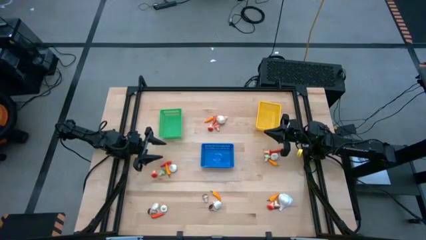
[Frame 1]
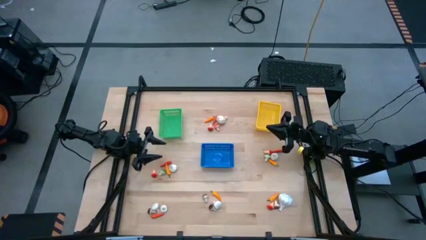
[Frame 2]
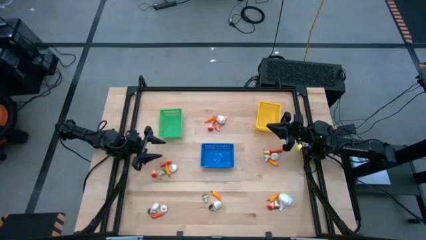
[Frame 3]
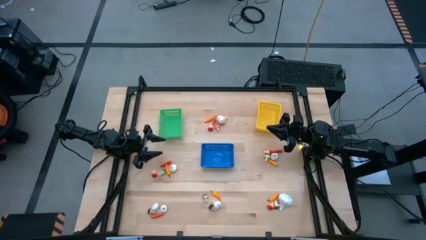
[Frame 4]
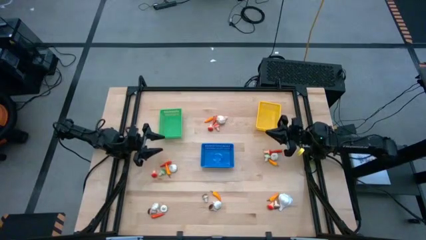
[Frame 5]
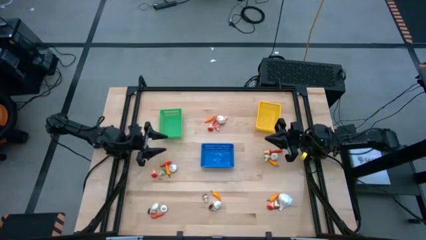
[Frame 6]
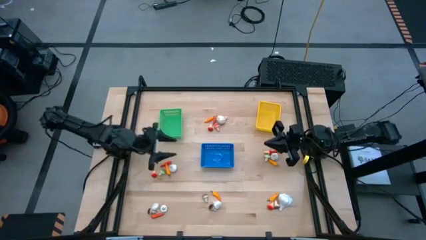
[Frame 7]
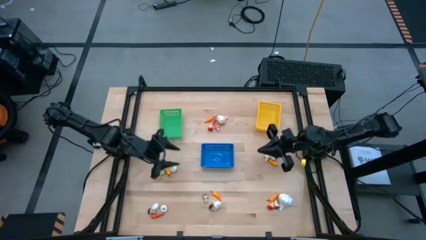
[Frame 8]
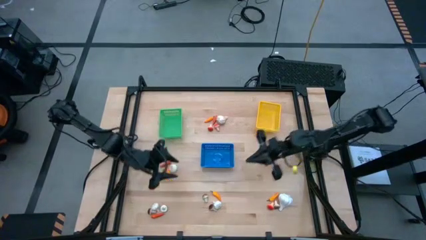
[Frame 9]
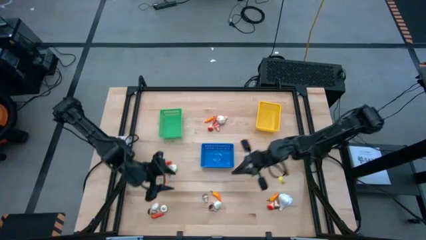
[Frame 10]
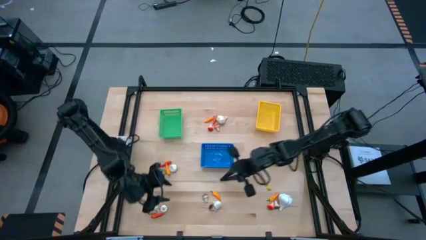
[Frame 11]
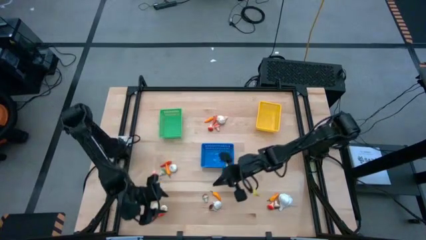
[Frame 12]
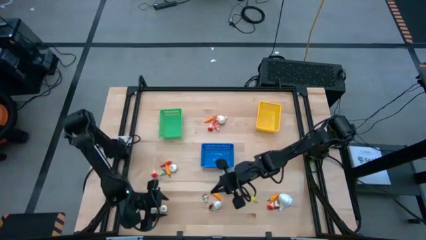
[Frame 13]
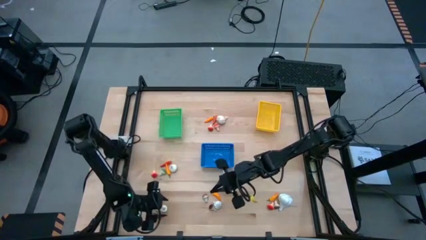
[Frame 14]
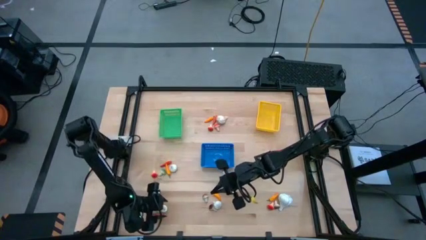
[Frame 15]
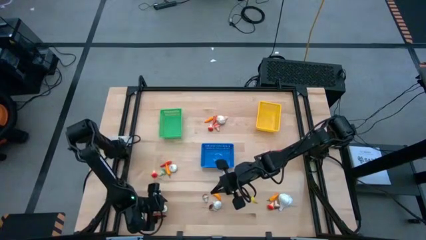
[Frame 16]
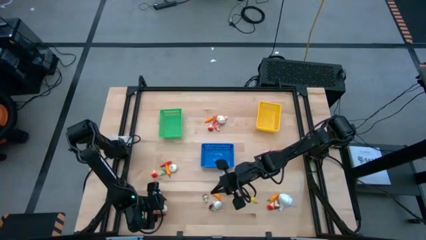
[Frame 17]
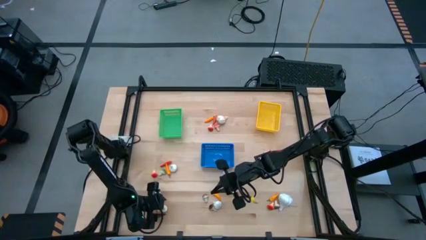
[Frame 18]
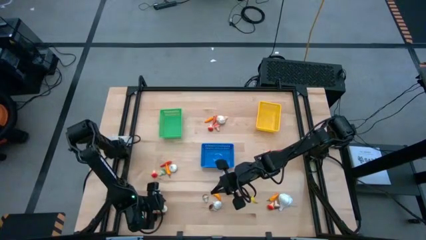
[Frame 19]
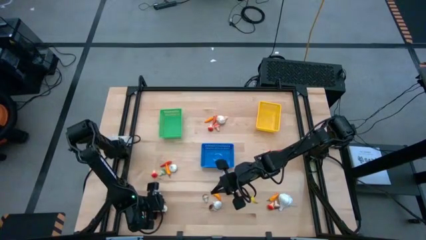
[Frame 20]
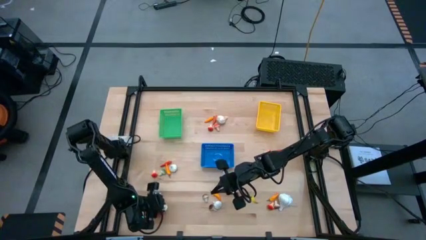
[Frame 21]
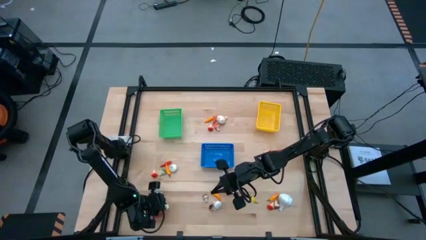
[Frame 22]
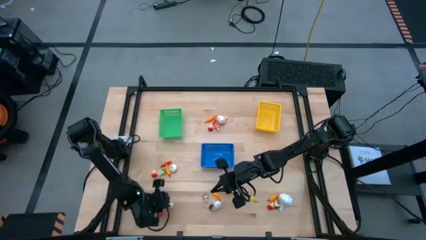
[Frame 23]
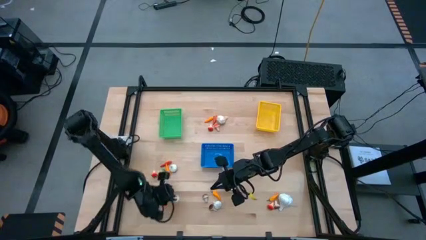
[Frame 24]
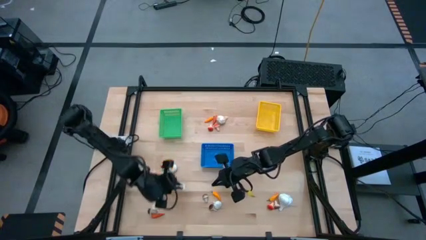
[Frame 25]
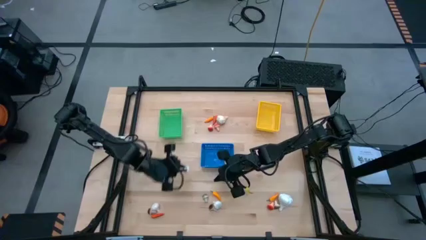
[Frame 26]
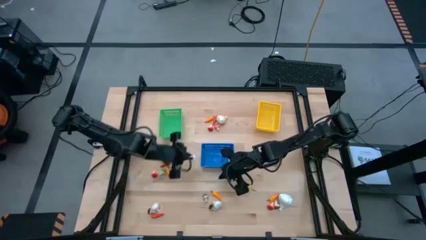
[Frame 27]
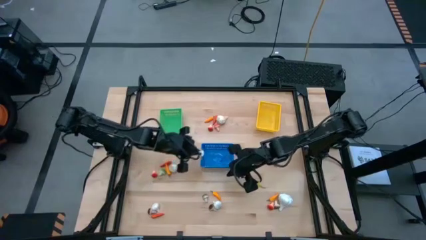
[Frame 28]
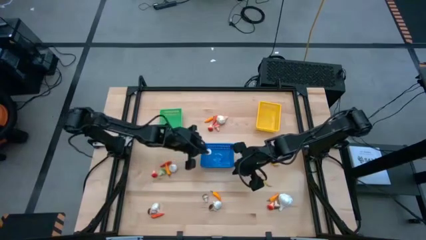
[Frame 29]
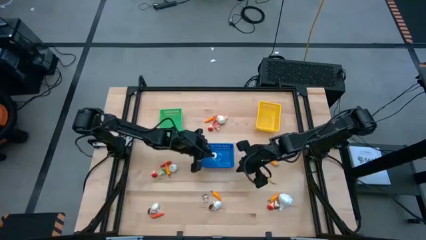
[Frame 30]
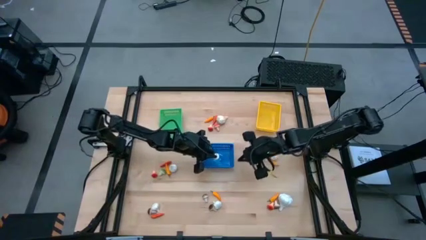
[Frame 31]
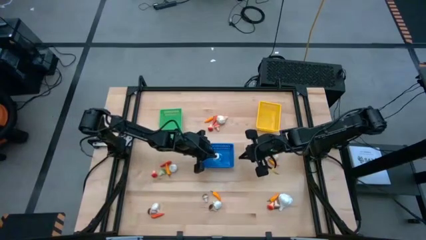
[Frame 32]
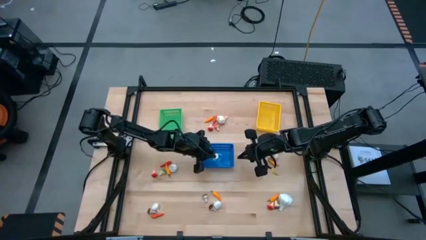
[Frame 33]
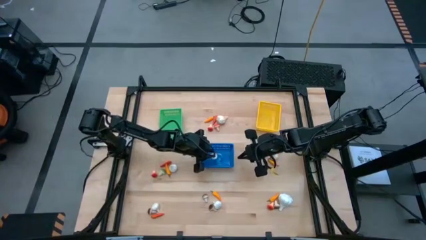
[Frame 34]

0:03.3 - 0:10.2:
Task: Sort produce into baskets
Put the bottom left green mushroom into the blue bin

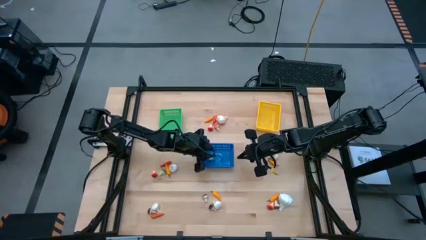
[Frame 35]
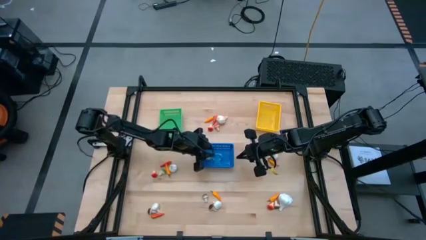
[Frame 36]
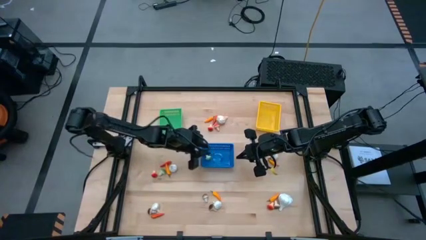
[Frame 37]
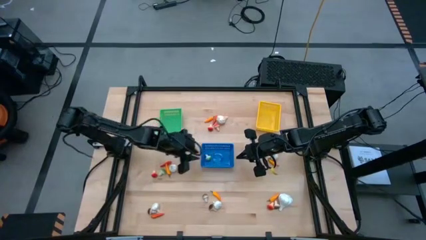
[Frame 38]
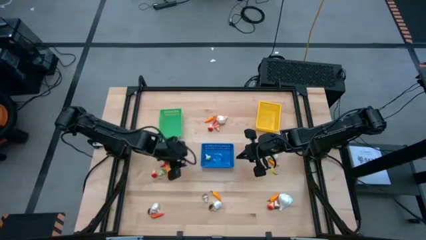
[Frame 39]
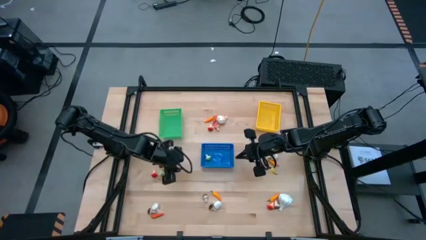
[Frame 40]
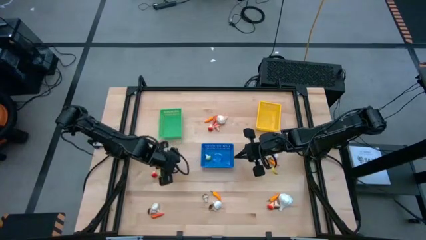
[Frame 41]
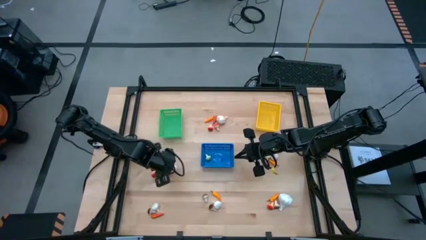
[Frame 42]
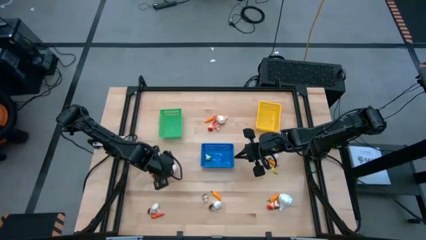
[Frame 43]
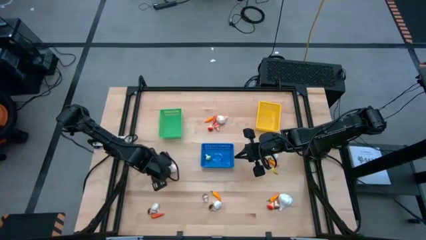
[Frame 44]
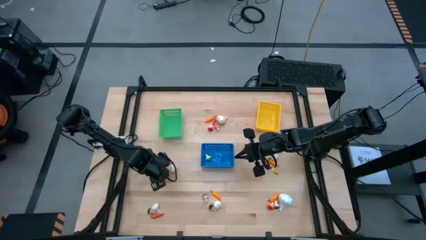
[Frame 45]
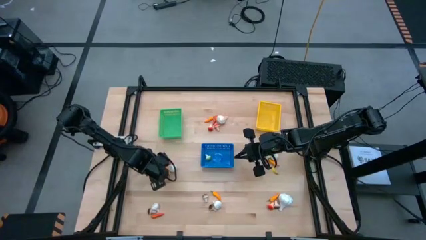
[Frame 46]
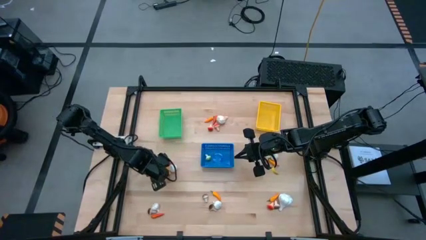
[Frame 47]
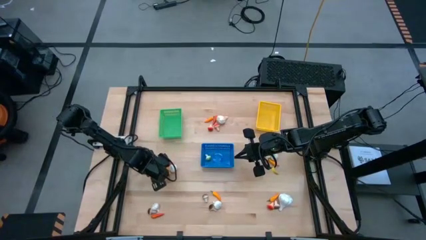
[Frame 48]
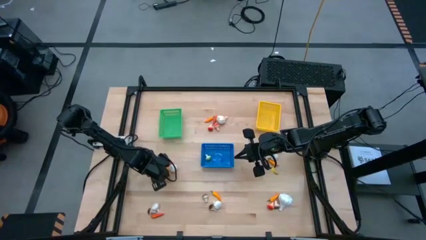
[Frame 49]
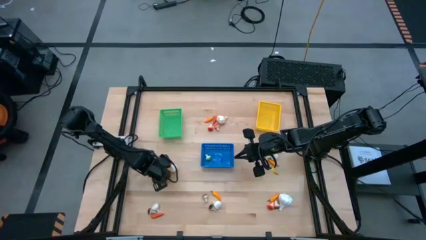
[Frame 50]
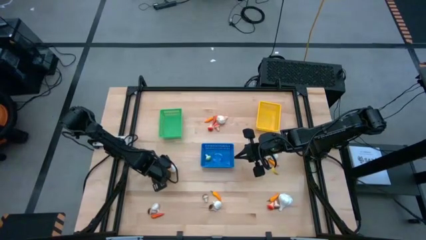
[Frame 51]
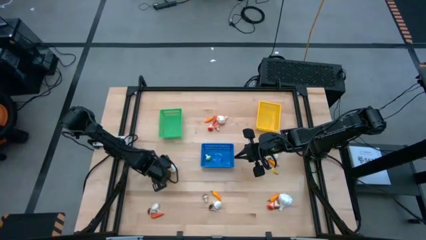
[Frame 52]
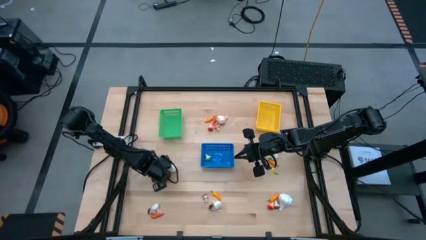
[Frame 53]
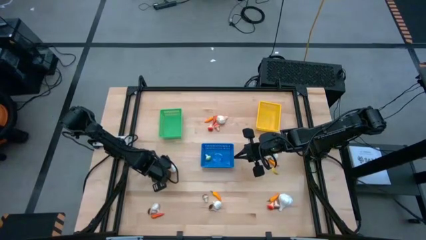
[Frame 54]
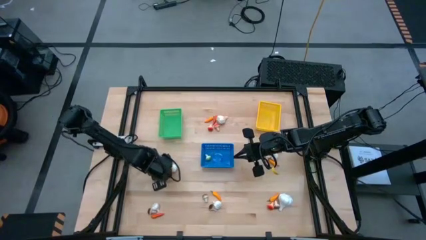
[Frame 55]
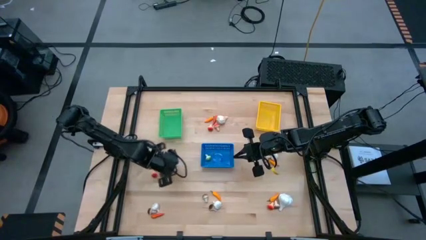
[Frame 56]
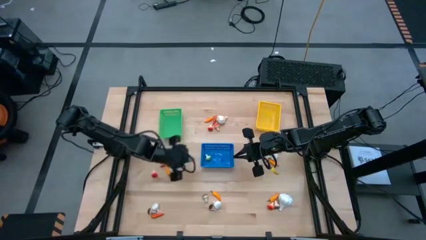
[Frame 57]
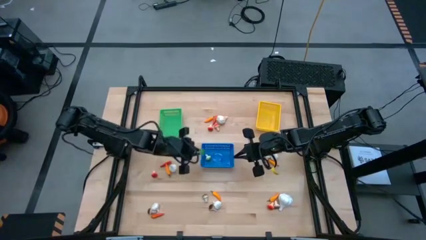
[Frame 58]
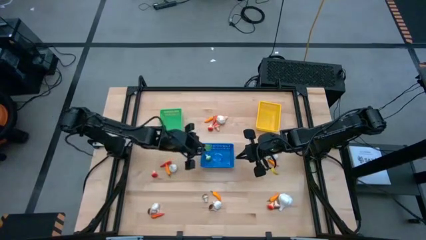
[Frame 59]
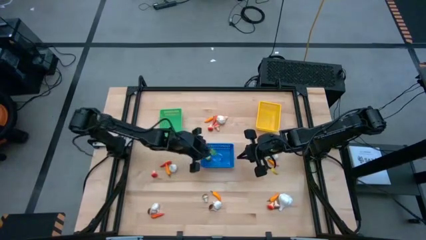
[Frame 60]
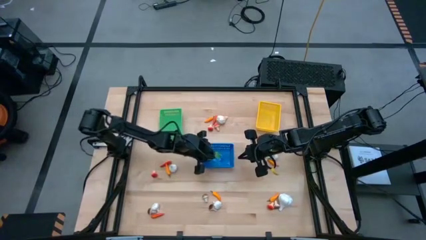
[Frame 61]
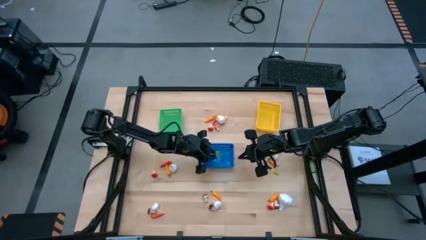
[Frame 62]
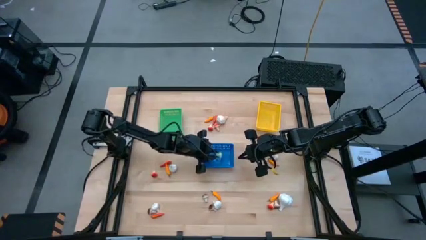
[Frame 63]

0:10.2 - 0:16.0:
Put the left green mushroom into the blue bin

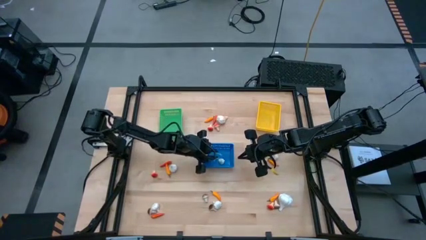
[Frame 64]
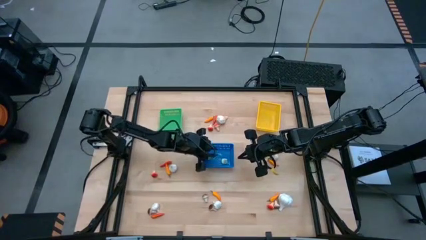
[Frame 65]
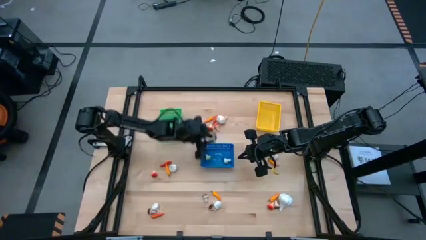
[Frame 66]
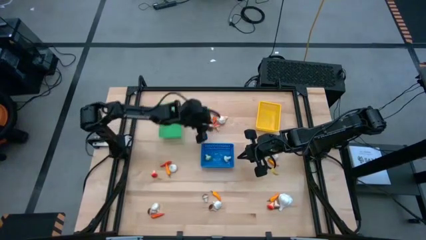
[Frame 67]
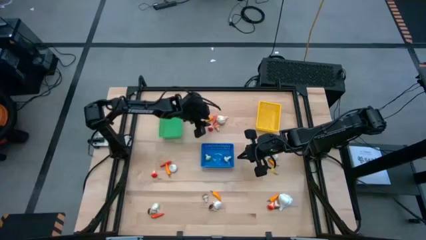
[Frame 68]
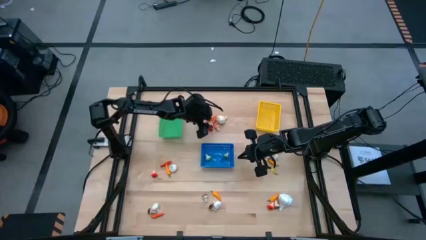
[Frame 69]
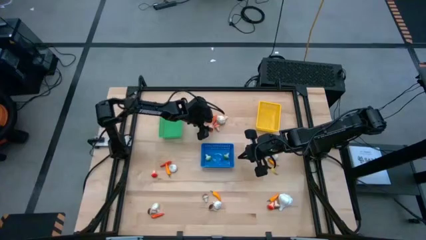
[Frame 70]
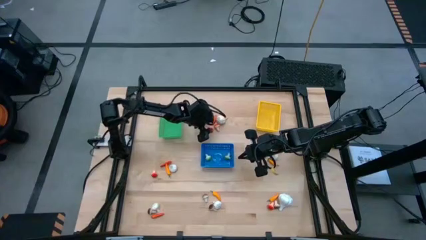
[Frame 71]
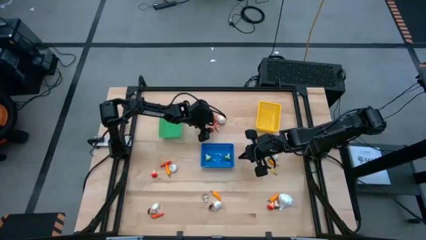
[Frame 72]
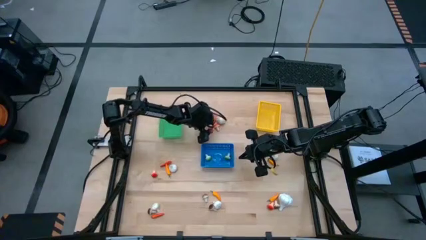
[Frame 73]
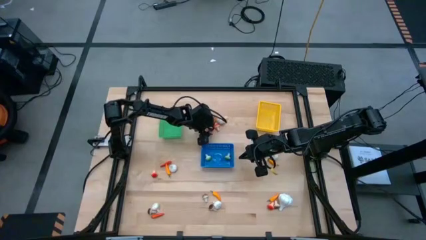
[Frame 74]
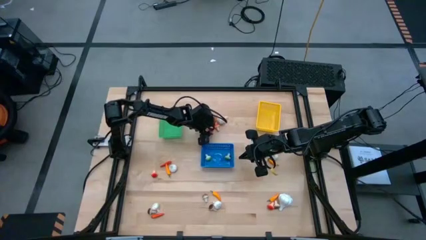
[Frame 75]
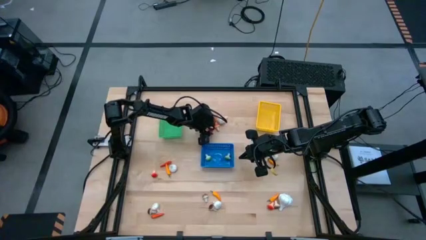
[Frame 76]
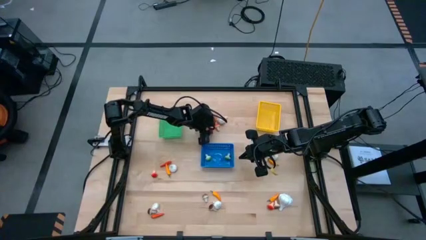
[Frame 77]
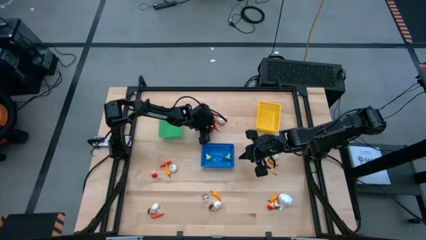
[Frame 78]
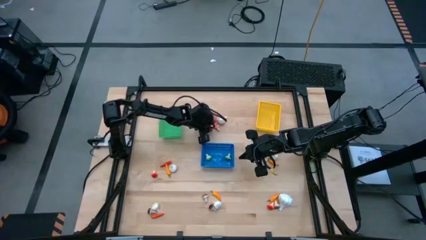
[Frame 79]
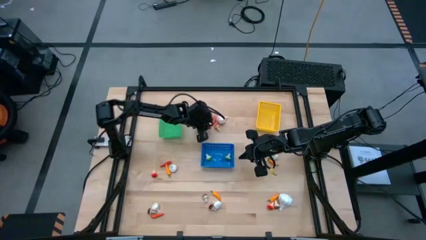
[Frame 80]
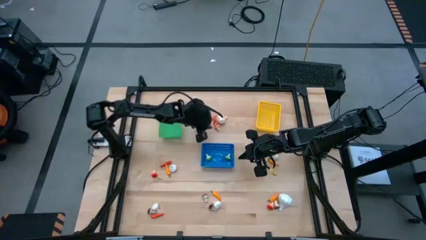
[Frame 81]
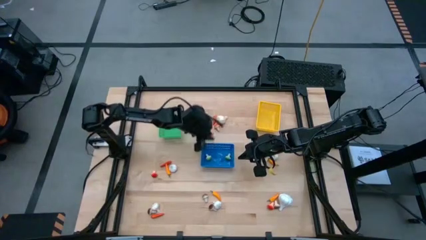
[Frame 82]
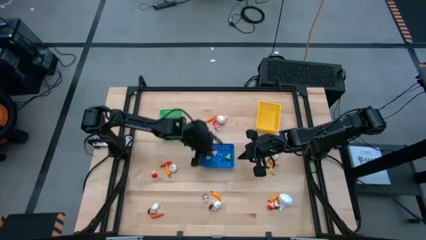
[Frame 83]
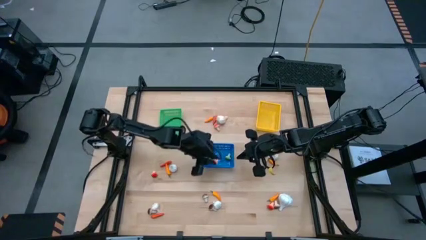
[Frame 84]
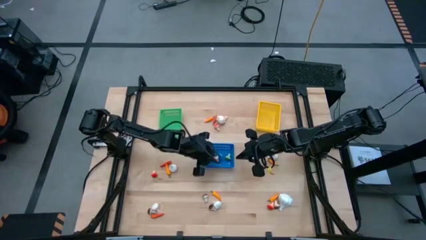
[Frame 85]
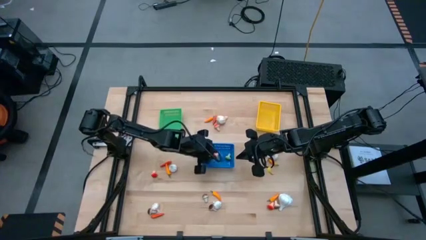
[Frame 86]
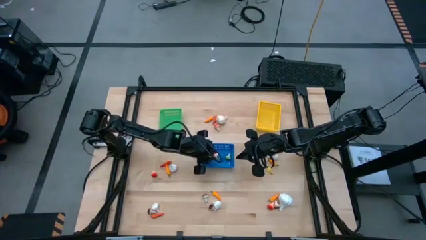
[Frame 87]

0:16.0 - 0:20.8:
Put the orange mushroom into the blue bin
